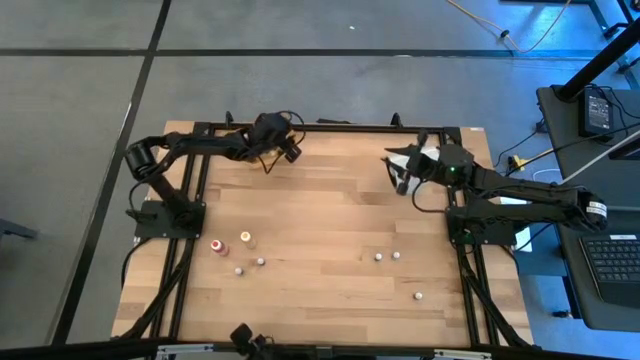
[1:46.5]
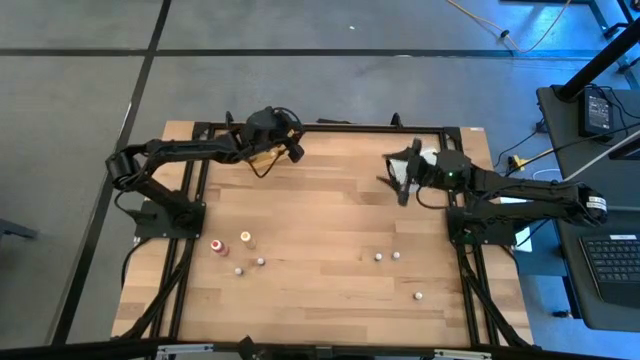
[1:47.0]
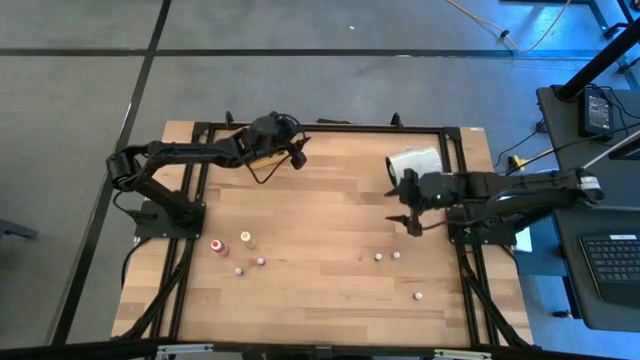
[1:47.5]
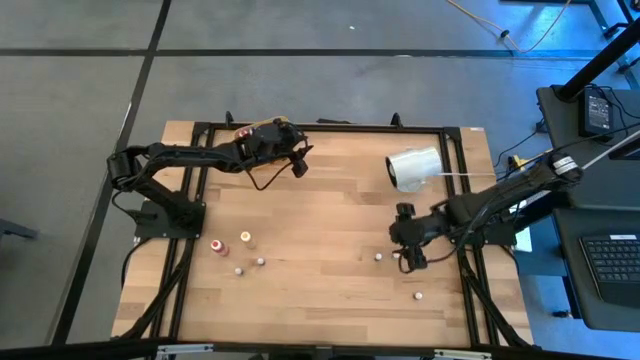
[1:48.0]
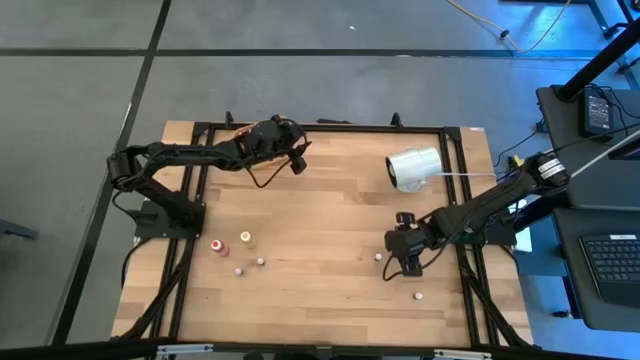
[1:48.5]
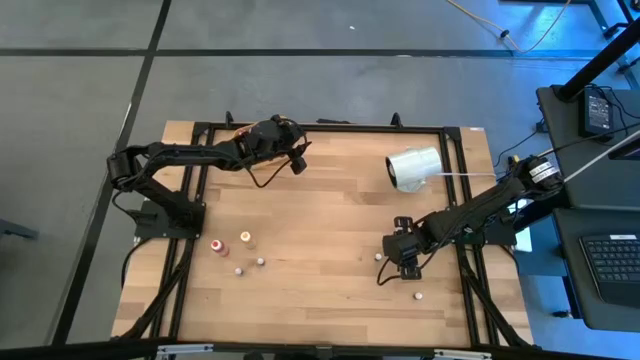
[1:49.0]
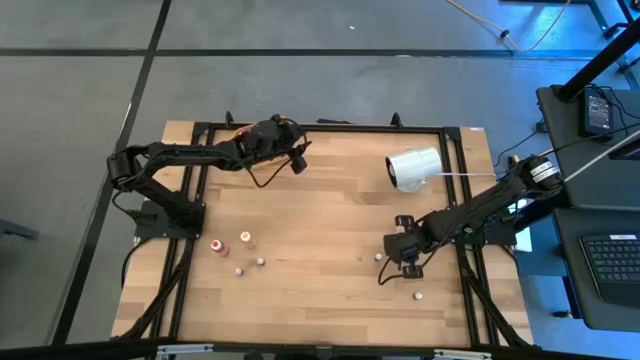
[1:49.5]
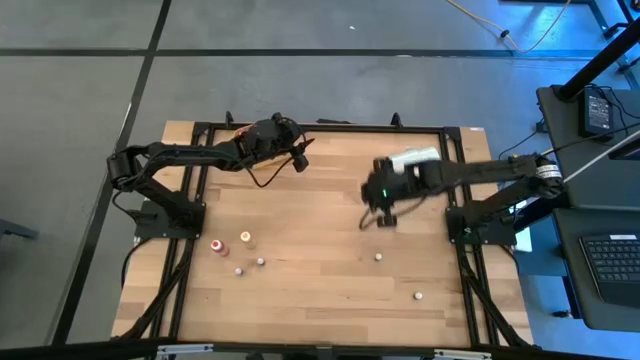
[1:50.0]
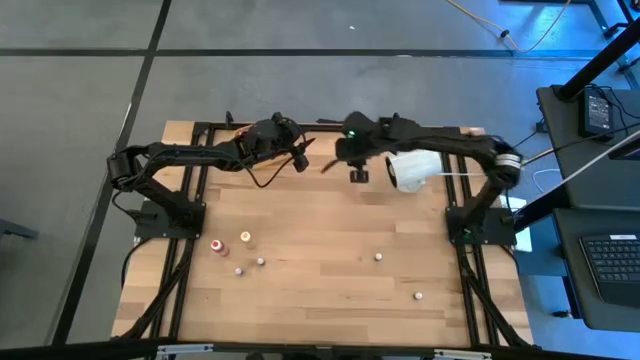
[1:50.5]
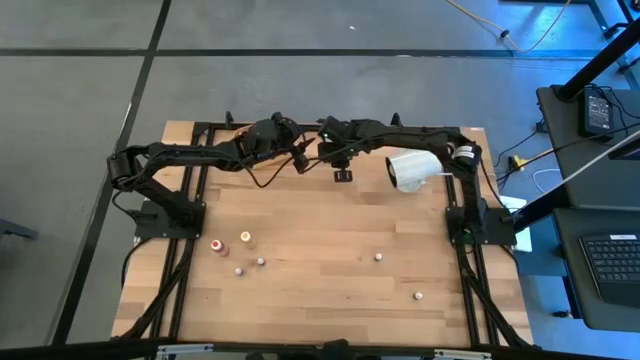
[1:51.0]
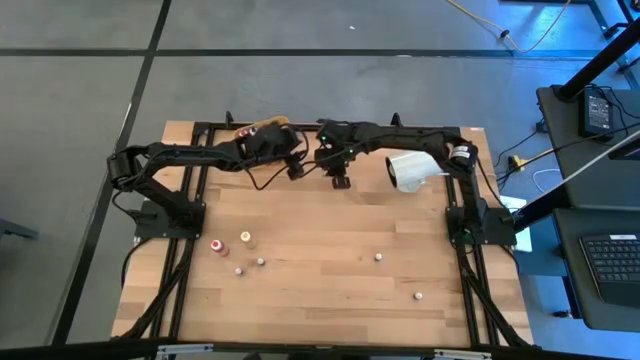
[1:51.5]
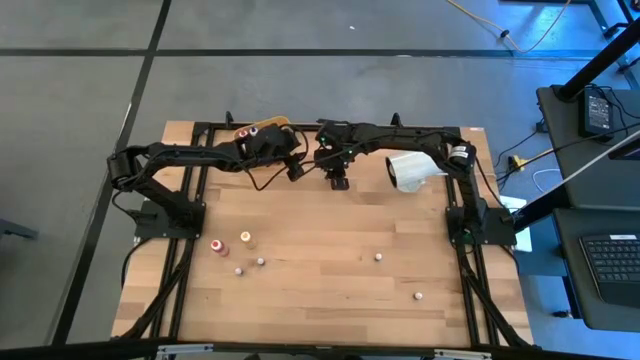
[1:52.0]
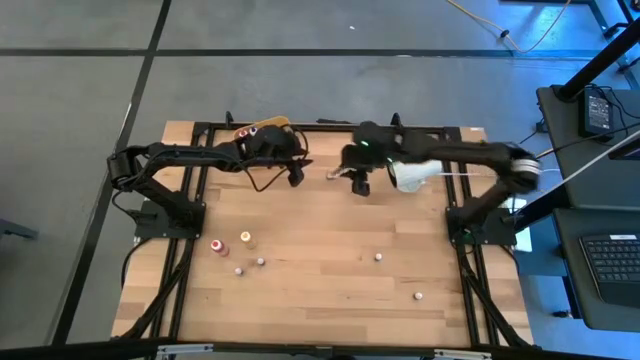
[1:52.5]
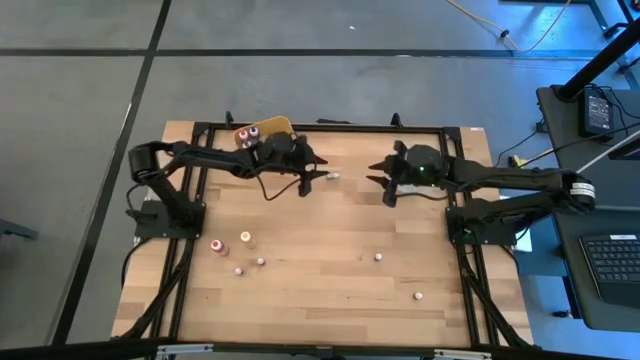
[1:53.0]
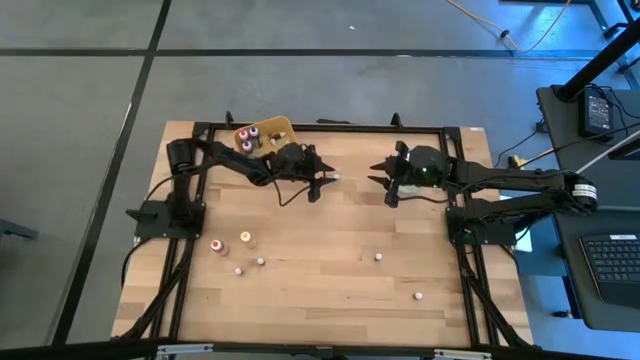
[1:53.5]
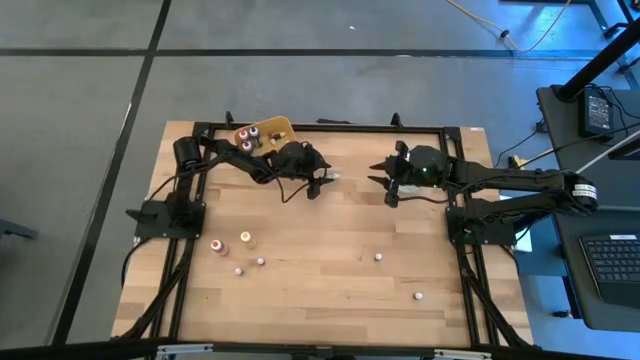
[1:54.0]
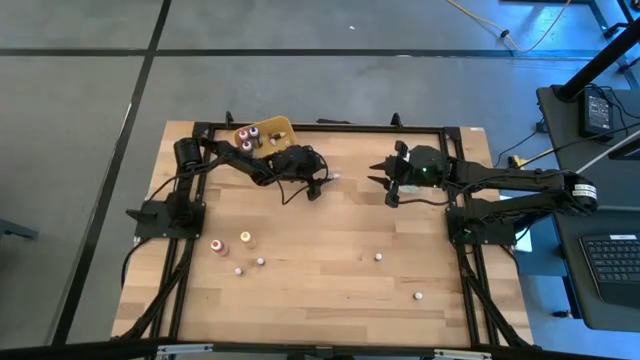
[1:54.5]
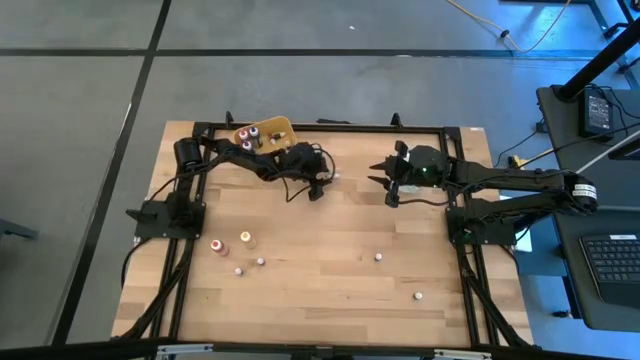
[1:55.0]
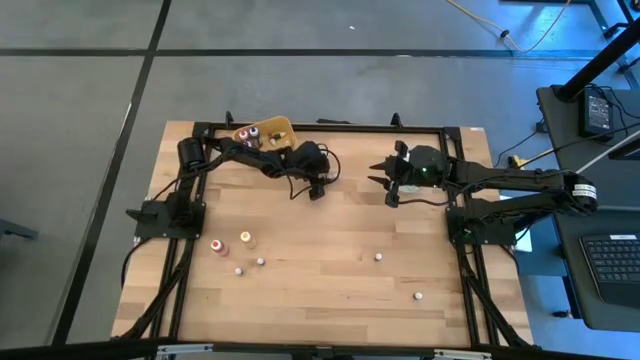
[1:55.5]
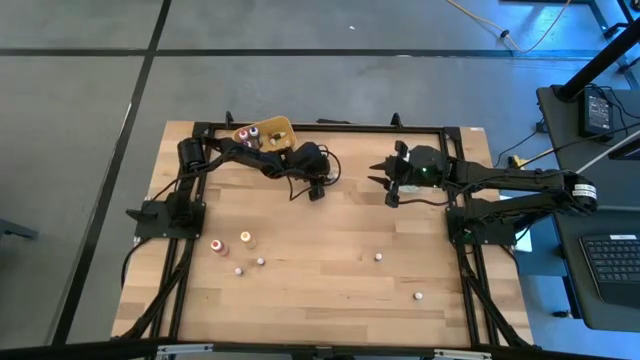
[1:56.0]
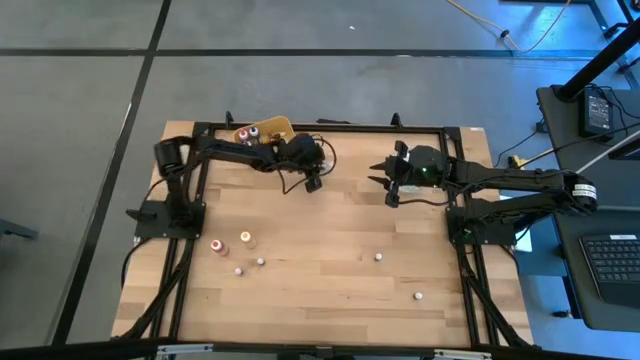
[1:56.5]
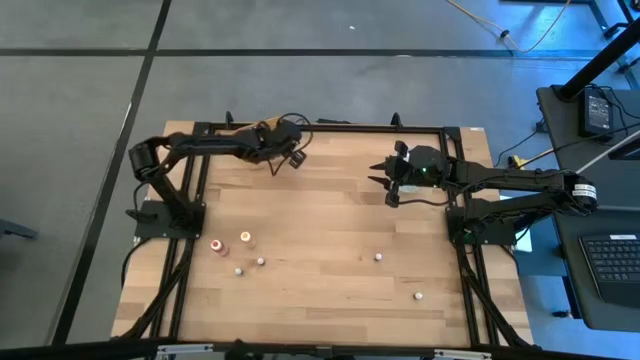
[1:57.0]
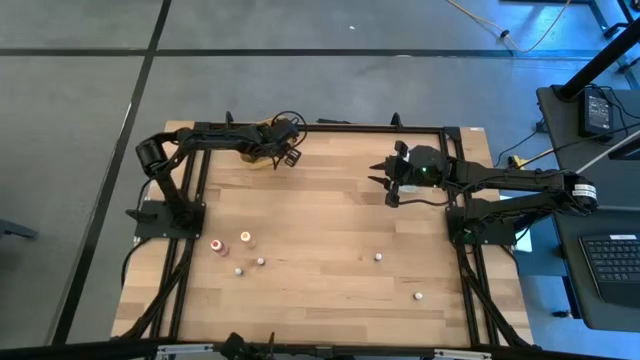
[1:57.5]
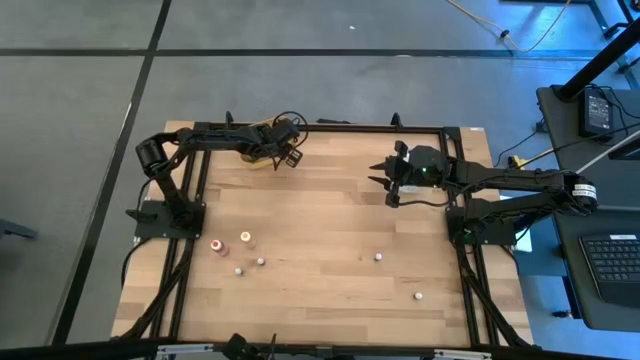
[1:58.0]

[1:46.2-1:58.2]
Task: Pick & Place food coloring
Put the small blue food coloring bottle into the yellow bin

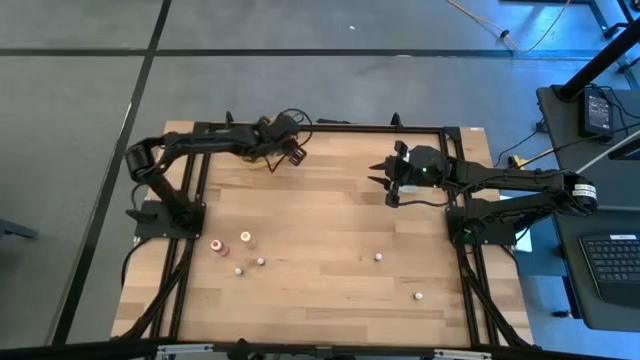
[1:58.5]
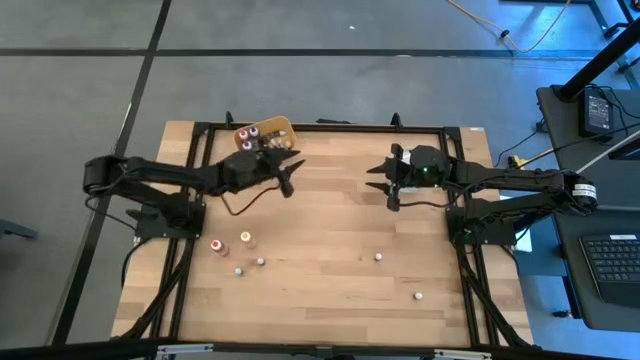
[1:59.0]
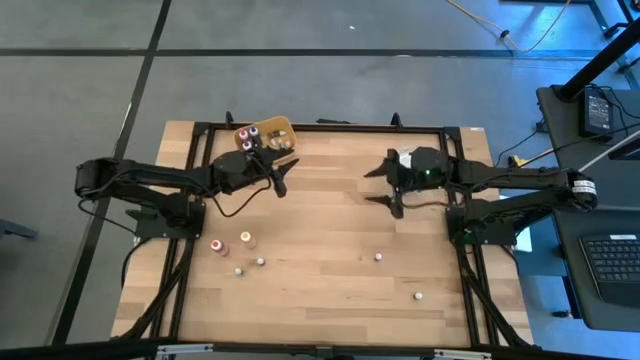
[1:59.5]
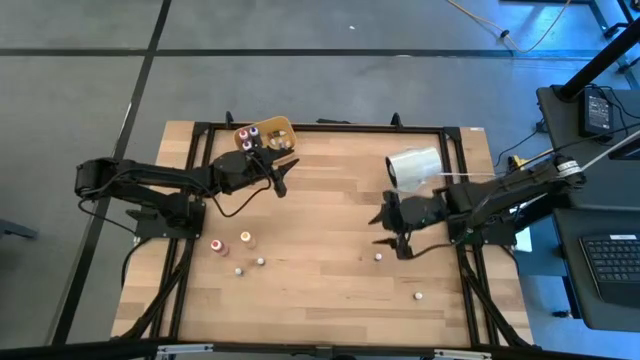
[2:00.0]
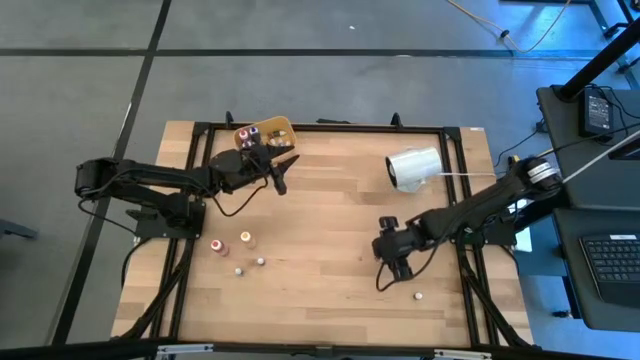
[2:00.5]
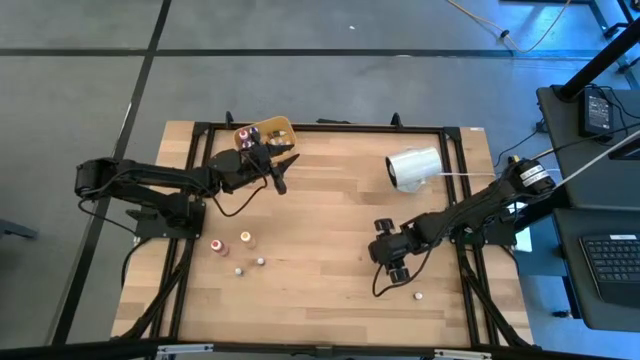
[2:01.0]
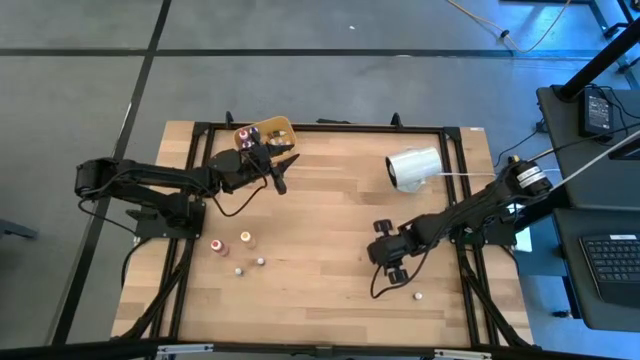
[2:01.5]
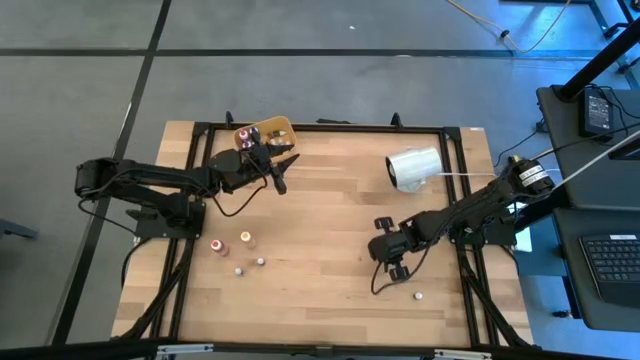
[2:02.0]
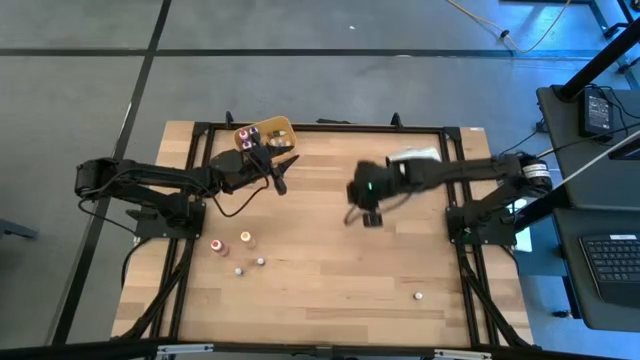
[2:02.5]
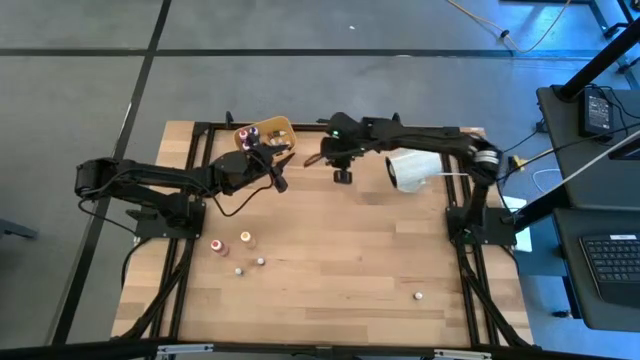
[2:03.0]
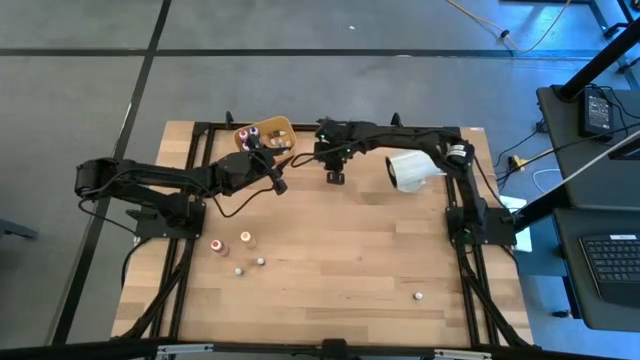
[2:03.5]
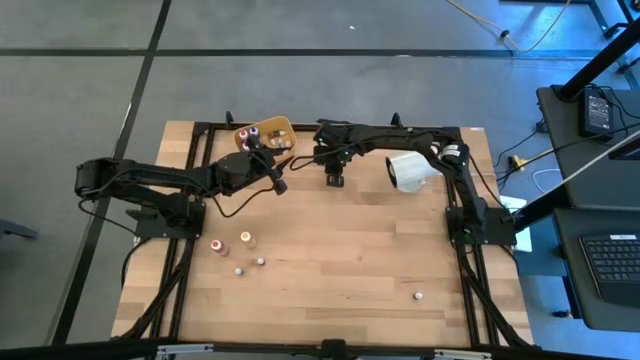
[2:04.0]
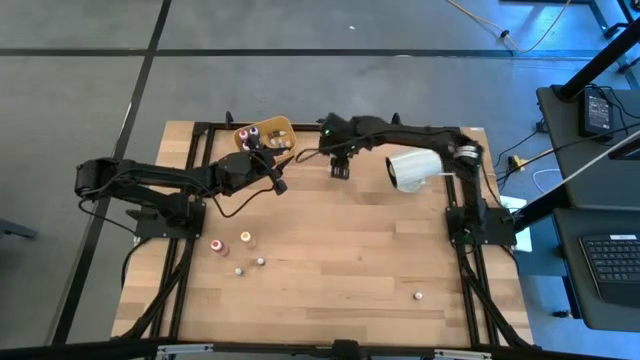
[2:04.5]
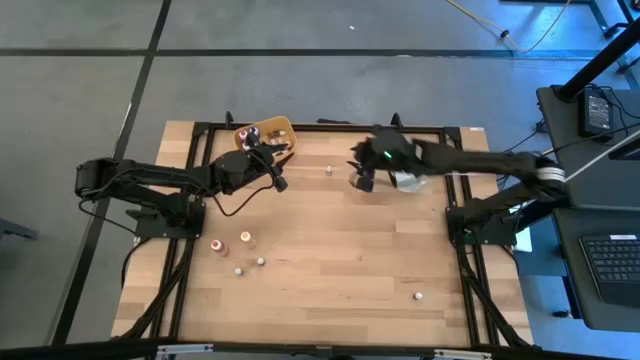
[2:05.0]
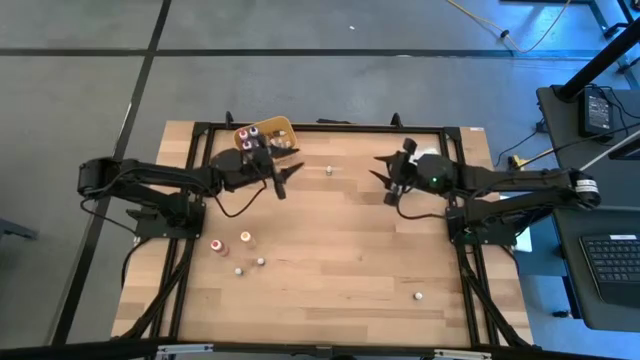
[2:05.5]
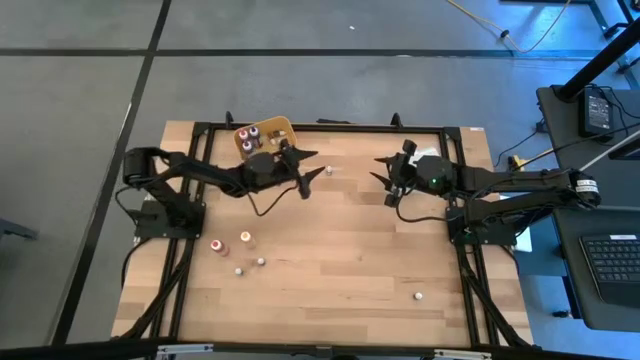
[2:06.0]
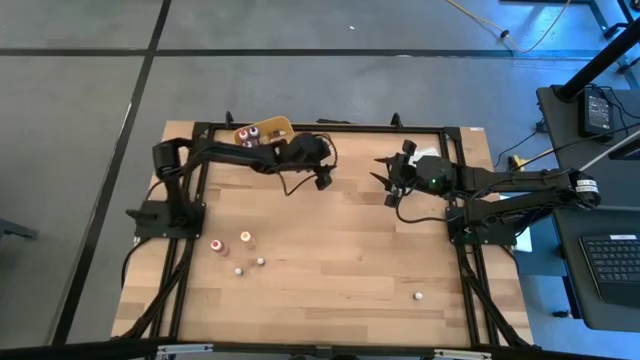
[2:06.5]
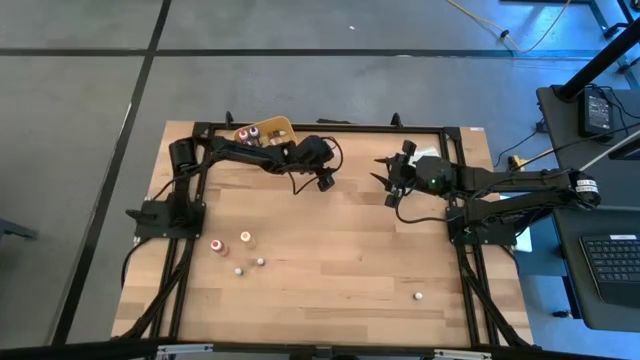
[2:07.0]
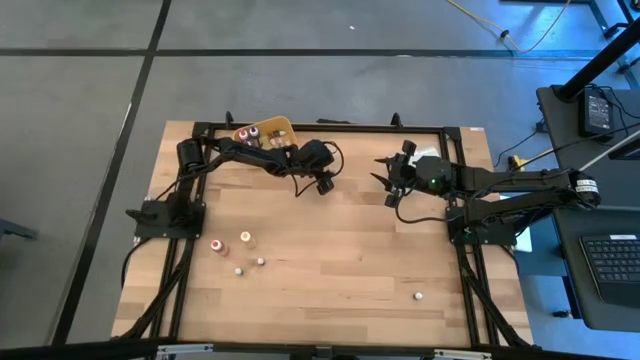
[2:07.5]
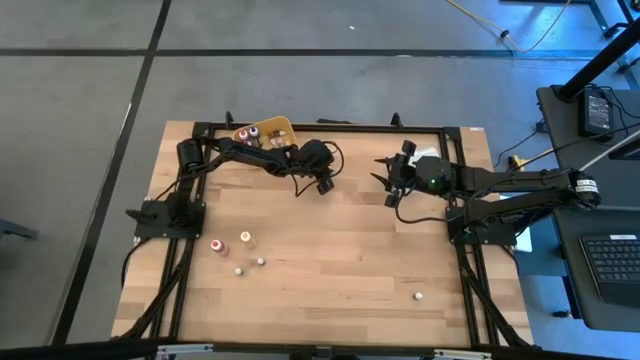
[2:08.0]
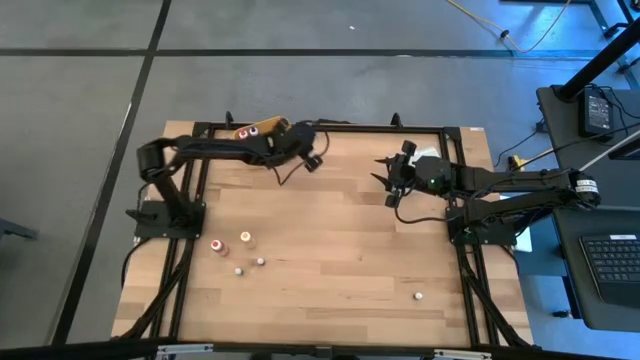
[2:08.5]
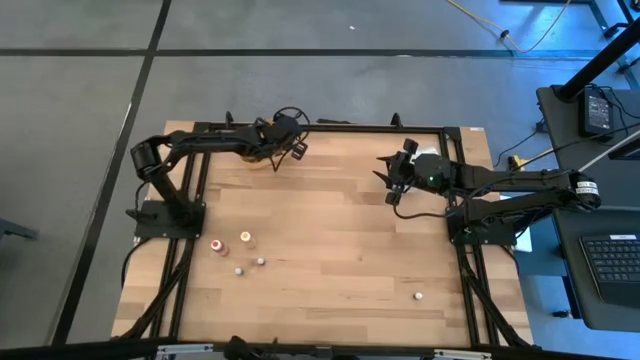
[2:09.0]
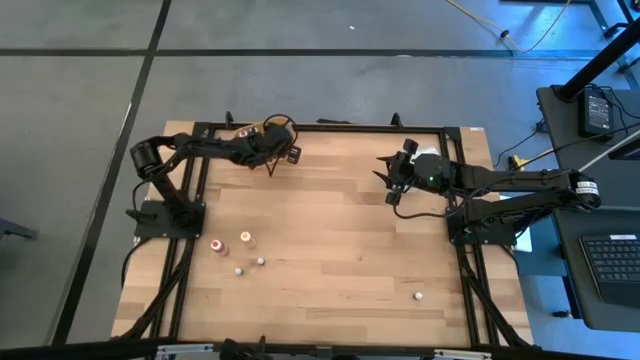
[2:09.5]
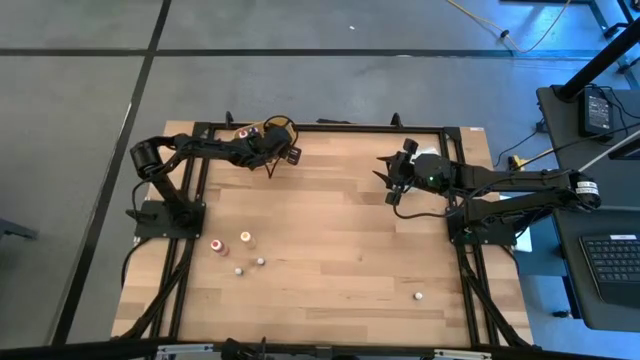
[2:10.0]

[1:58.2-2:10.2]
Put the small purple food coloring bottle into the yellow bin
